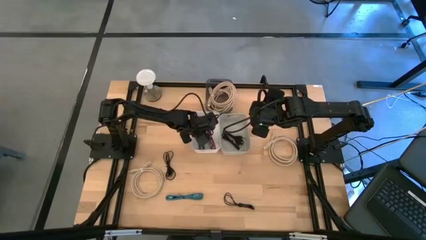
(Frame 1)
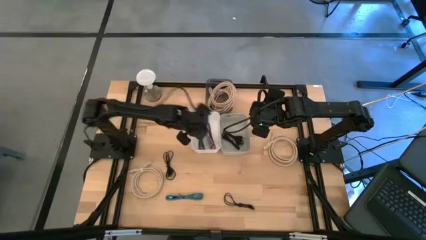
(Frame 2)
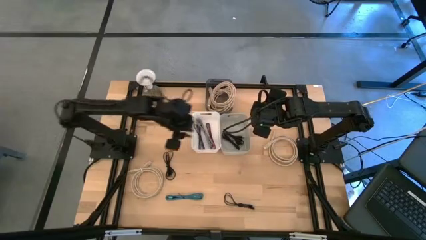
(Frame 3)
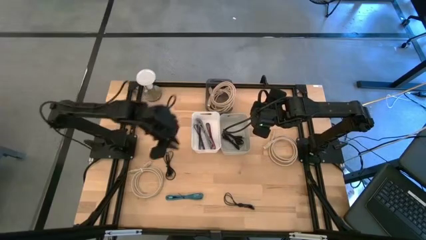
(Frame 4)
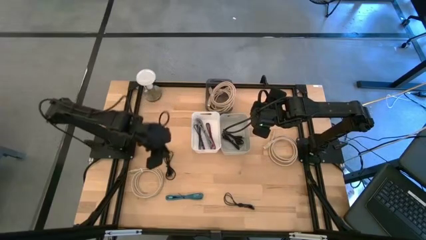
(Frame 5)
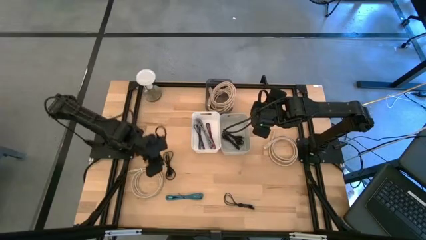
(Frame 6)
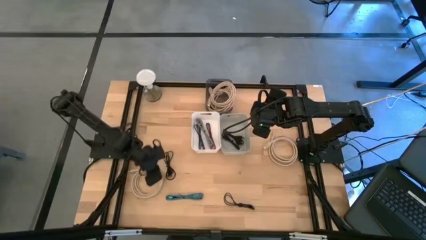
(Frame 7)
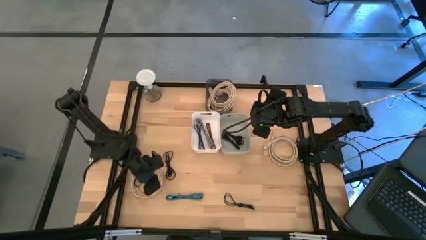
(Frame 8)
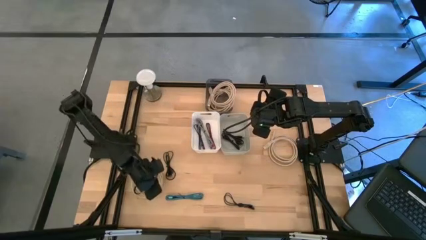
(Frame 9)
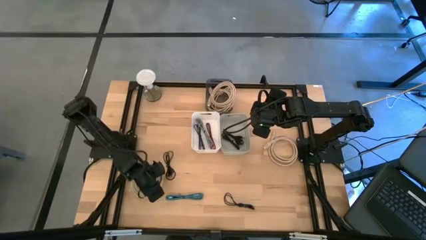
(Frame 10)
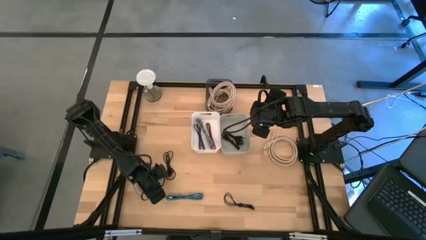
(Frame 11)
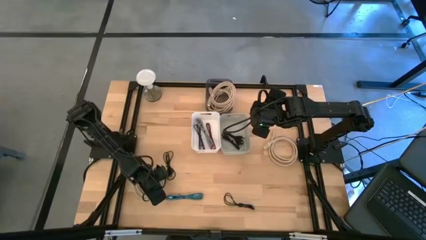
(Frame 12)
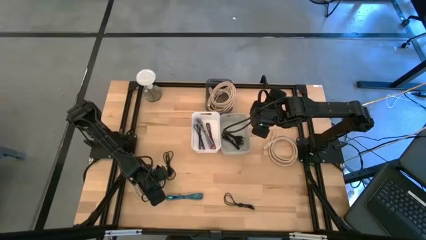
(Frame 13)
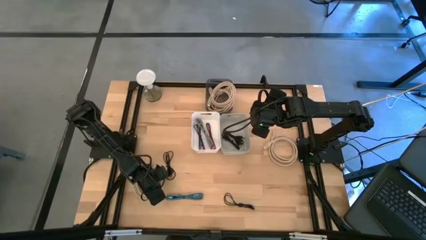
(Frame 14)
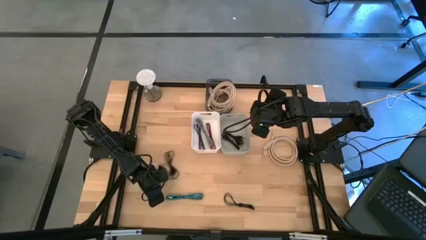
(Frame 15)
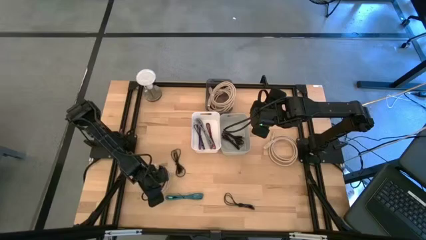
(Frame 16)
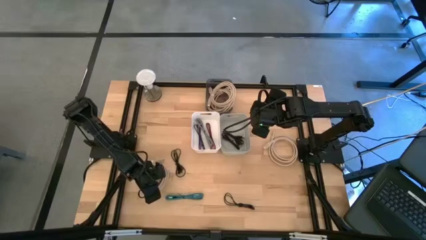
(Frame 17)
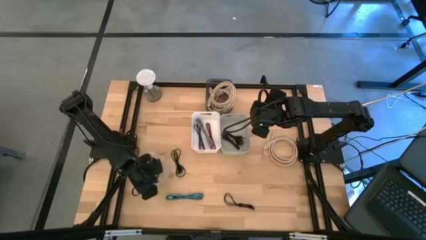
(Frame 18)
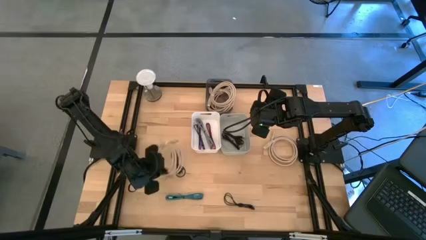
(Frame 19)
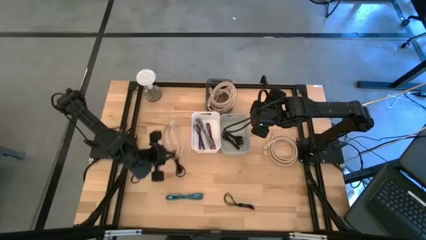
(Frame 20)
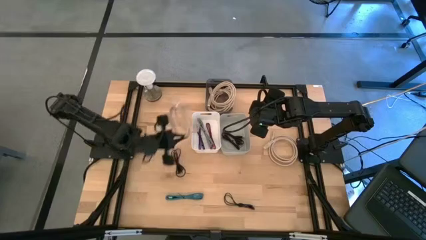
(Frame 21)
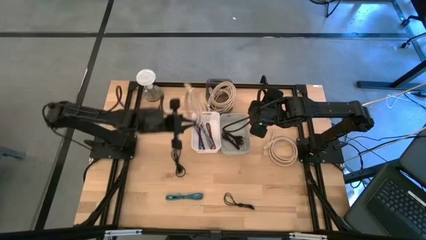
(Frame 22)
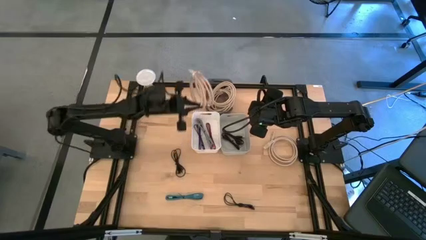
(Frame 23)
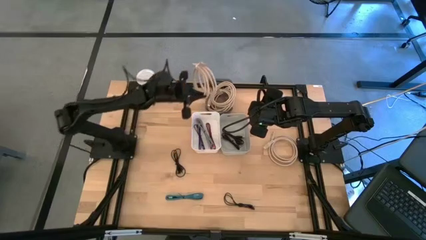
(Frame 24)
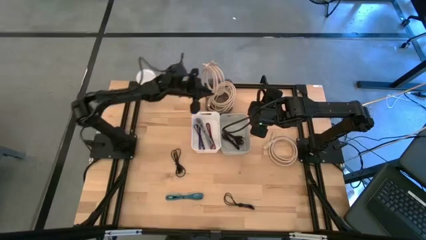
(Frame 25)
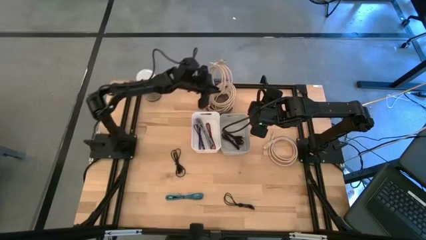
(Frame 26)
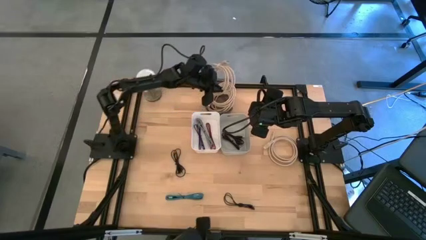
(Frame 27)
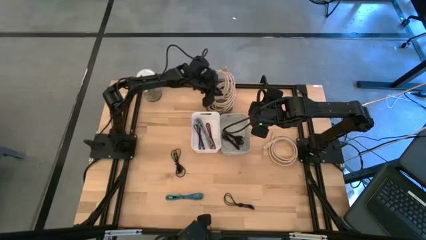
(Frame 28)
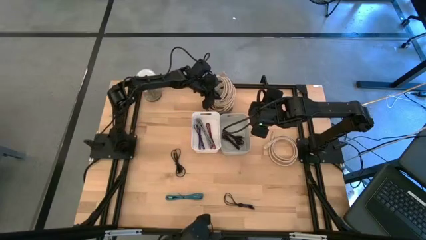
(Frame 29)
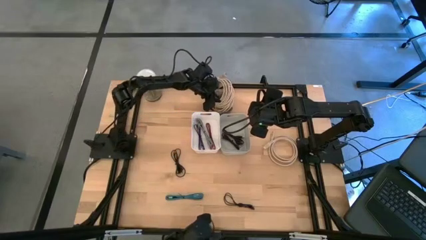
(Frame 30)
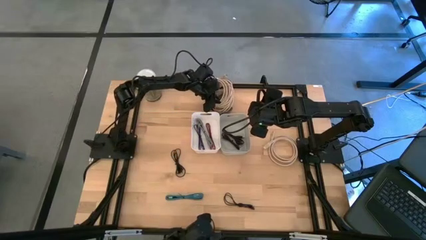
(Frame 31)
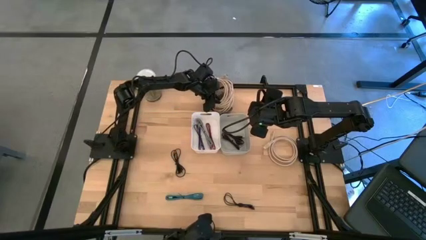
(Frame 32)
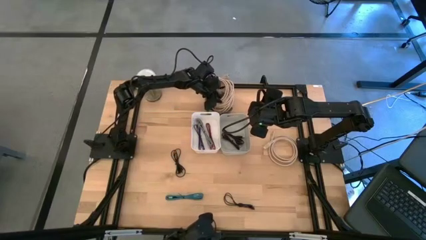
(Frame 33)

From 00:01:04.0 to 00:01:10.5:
Task: Pick & Place USB Port
Put the brown HDMI cable into the black bin

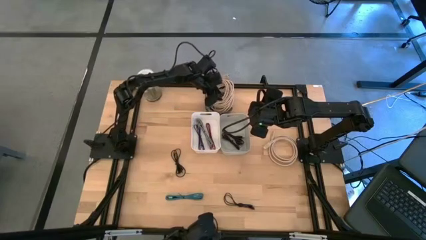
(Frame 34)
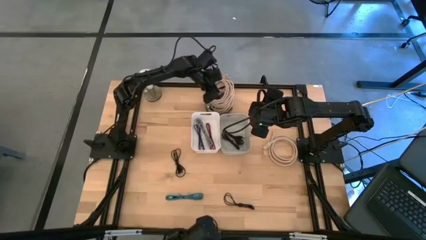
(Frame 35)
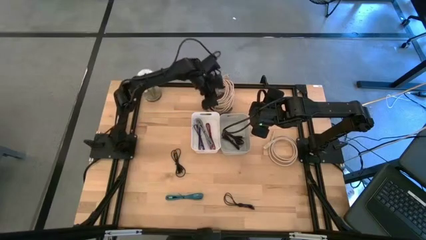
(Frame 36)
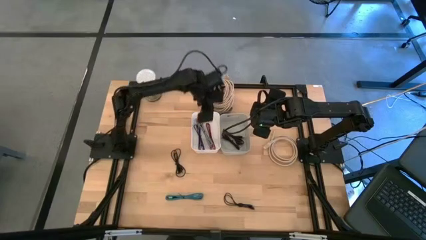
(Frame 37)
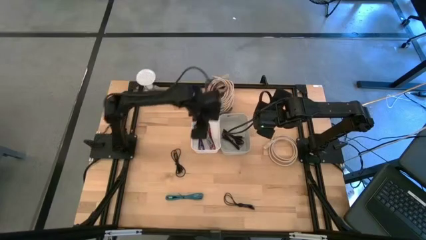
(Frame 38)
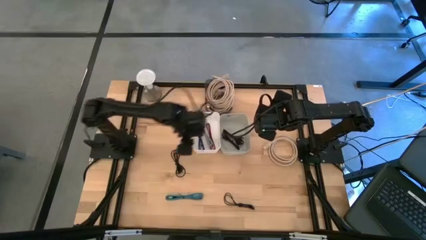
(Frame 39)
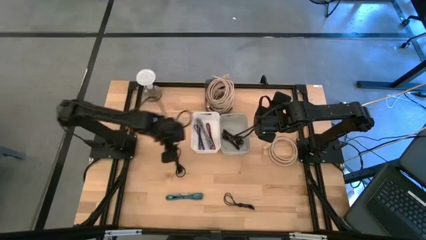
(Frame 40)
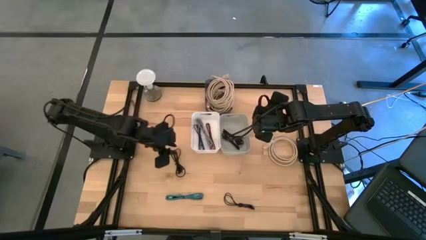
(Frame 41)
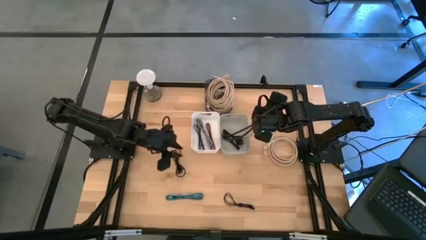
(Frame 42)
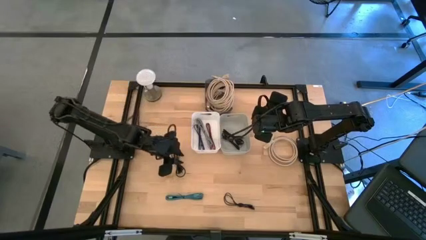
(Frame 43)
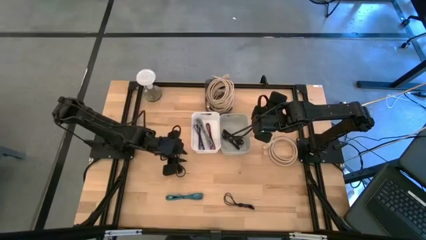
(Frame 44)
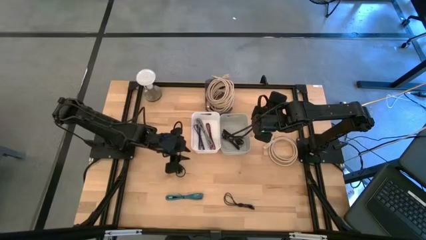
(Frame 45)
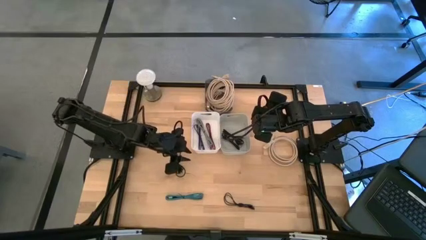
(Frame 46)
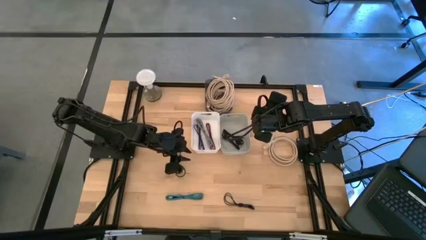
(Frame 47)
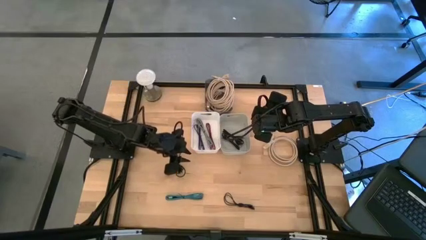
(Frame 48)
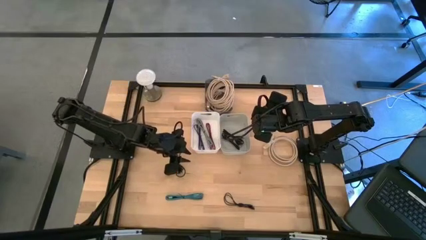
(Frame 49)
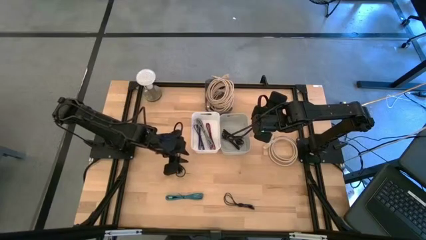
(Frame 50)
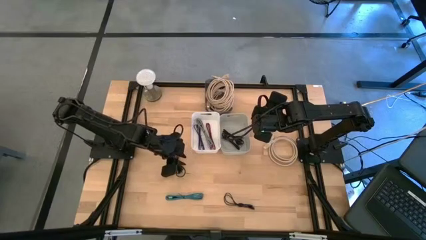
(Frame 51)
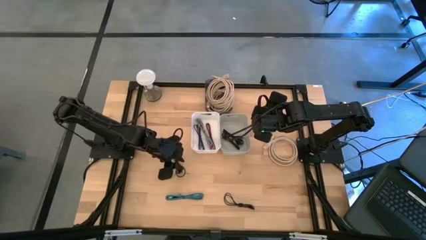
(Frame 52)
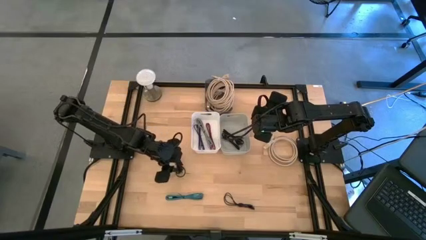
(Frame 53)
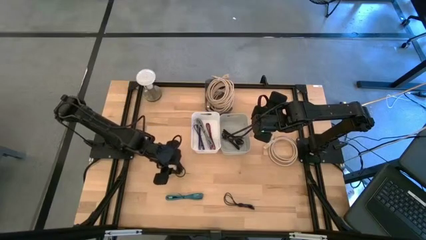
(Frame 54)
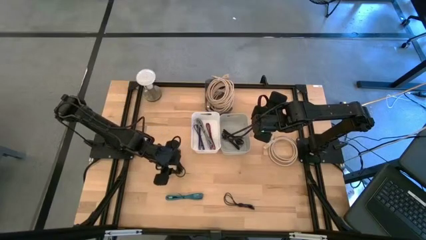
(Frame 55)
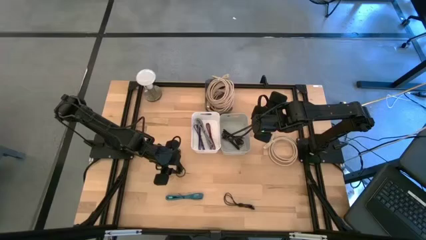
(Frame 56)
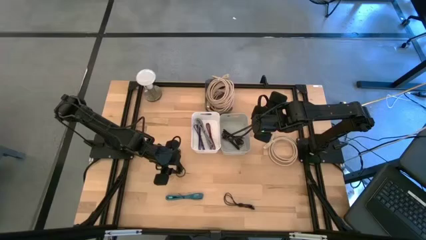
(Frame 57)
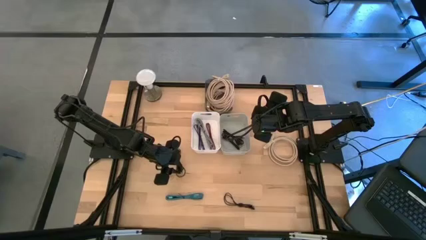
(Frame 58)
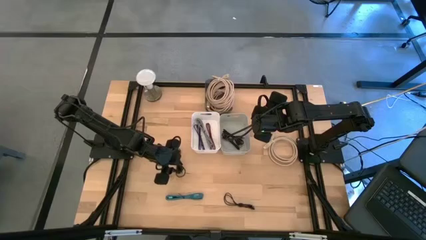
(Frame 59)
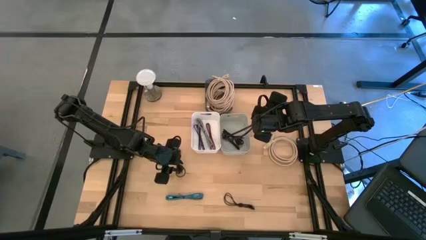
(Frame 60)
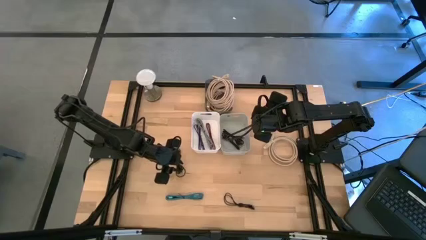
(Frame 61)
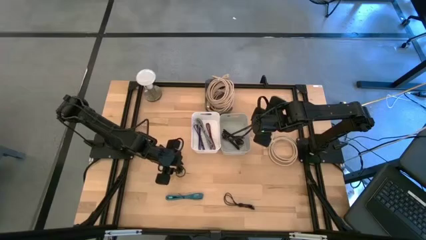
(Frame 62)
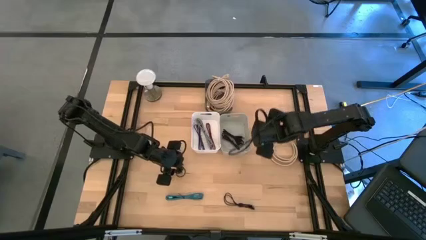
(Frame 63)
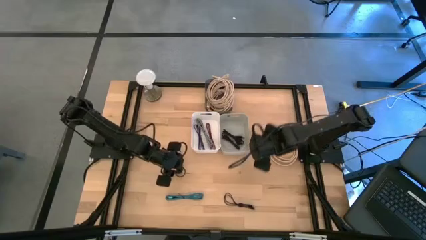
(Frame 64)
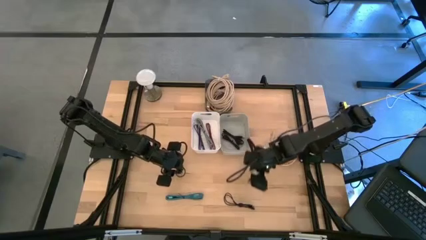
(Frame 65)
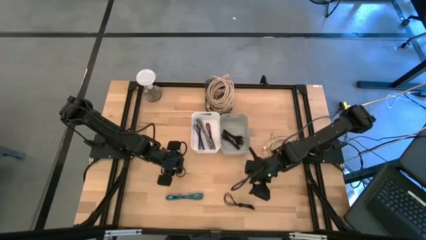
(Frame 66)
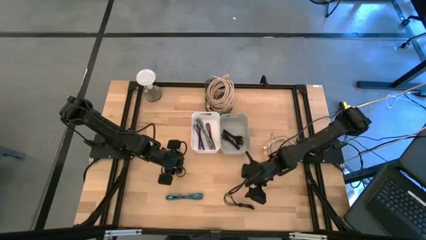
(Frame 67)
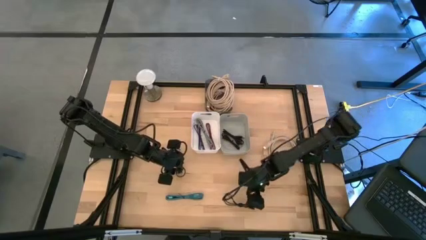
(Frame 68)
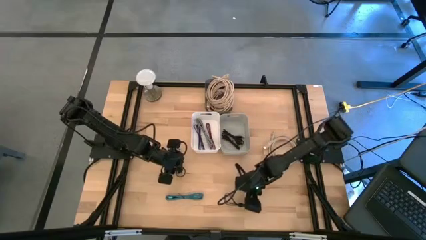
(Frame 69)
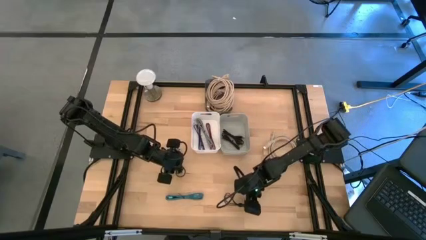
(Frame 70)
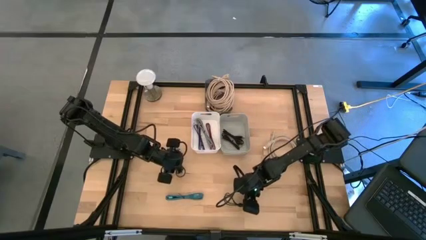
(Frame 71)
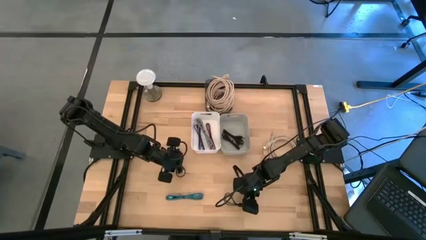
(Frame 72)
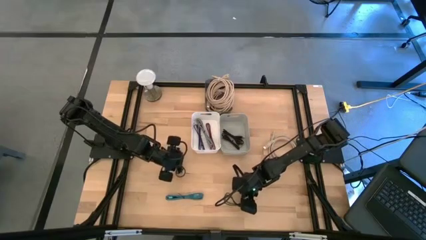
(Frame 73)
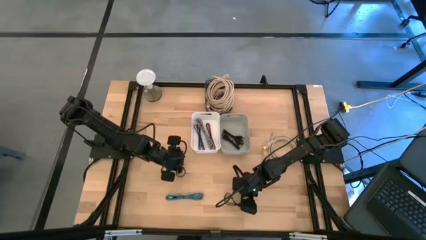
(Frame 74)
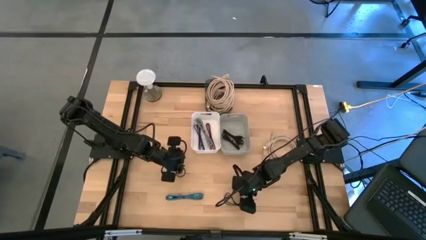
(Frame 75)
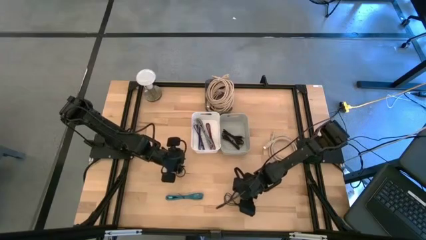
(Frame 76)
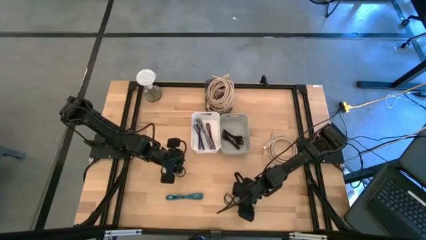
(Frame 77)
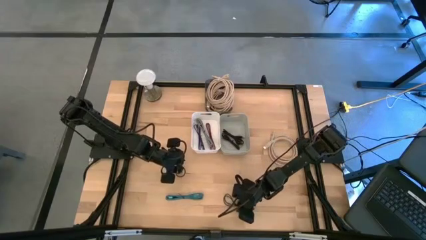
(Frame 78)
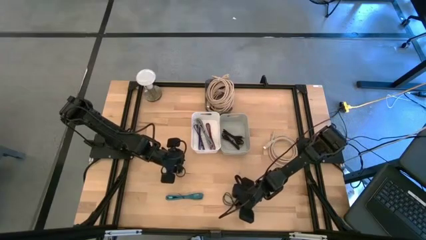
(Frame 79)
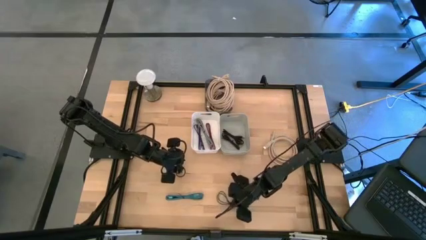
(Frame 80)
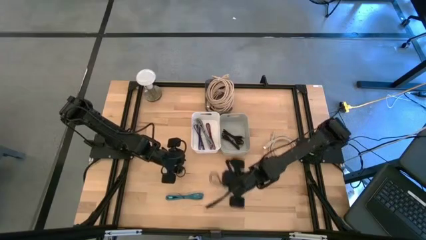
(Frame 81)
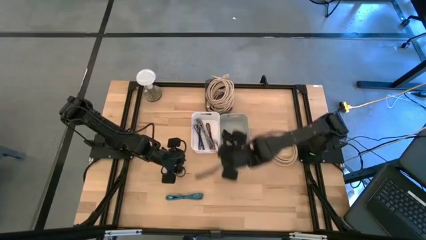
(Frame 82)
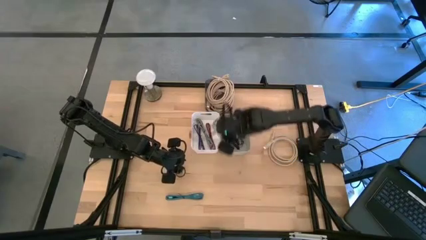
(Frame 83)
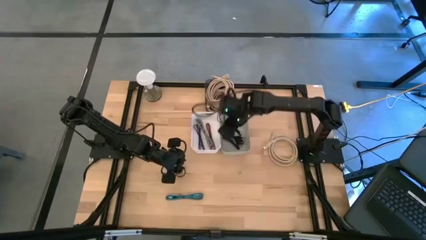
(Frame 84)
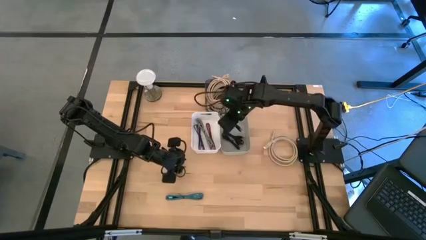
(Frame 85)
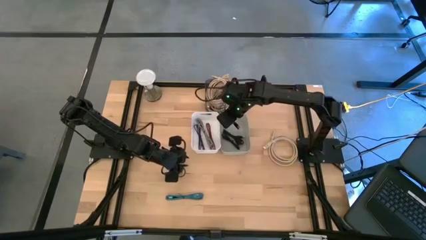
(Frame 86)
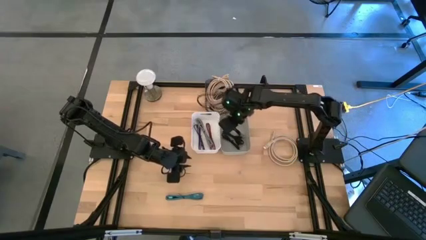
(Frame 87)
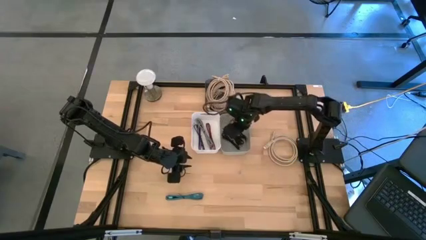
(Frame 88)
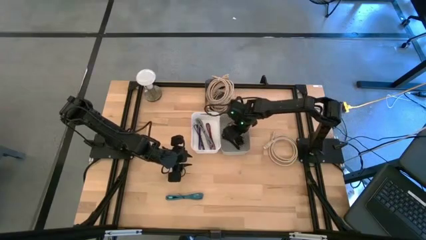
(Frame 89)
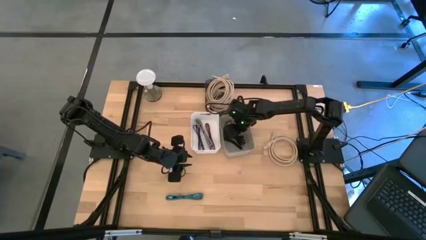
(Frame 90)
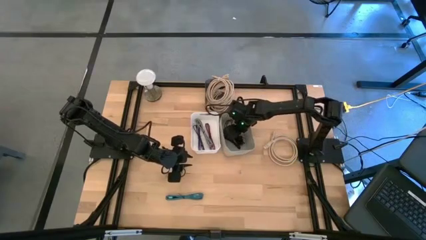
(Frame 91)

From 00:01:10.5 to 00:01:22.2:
Put the black charger cable into the gray bin
